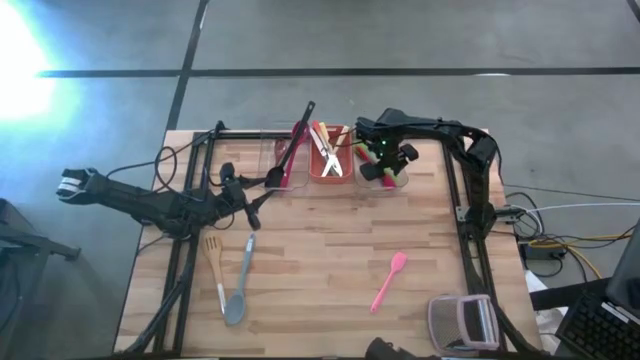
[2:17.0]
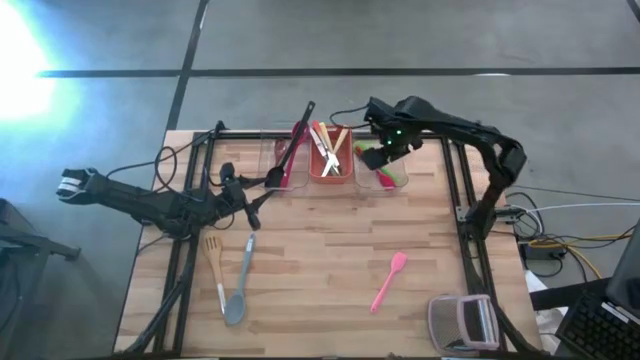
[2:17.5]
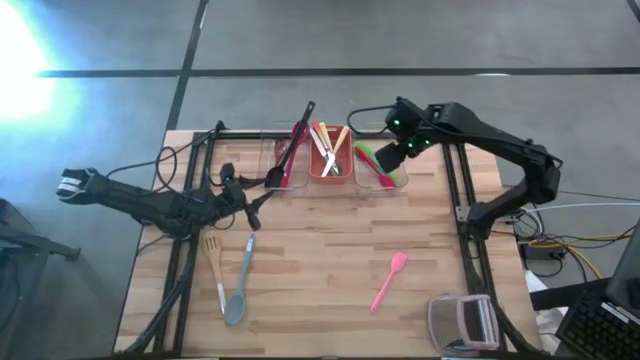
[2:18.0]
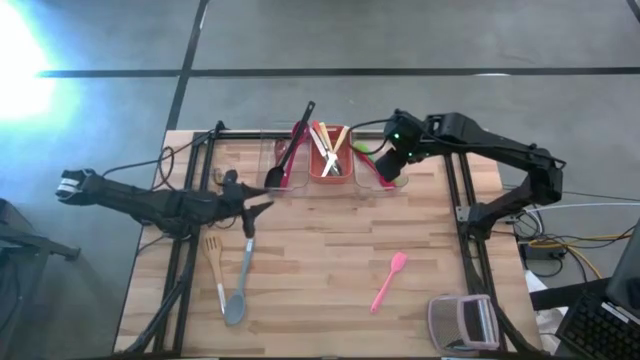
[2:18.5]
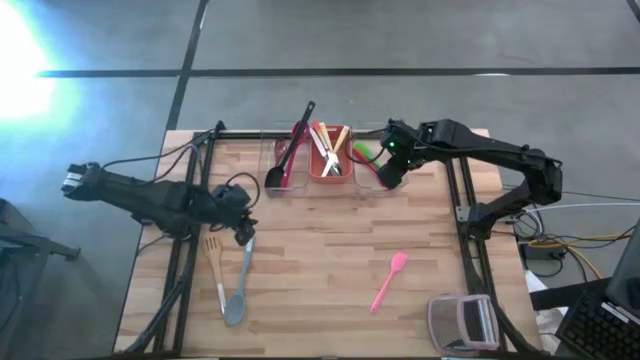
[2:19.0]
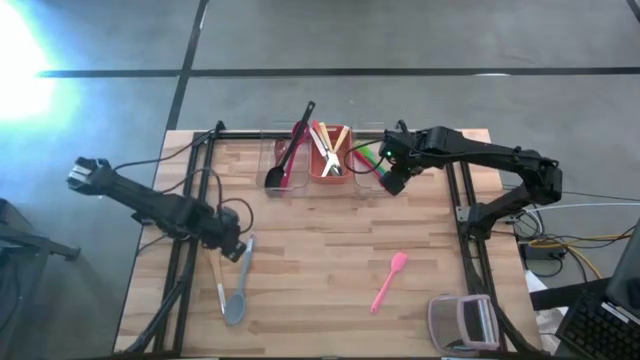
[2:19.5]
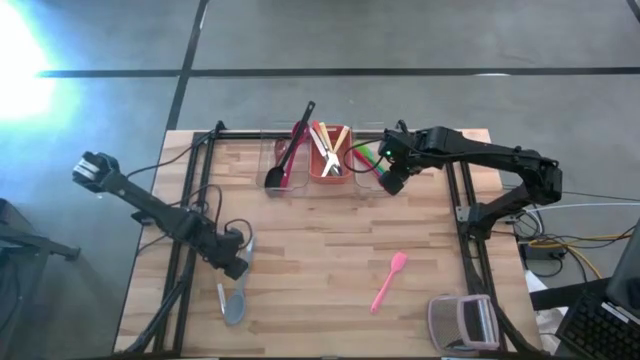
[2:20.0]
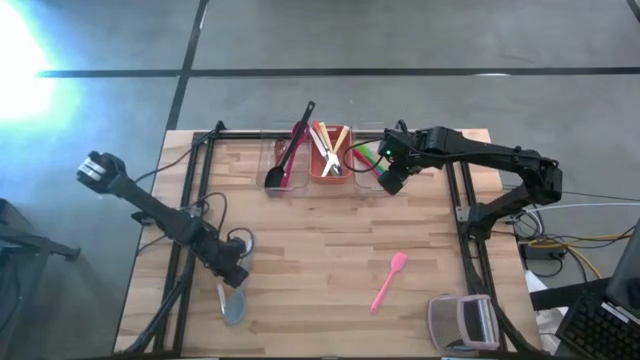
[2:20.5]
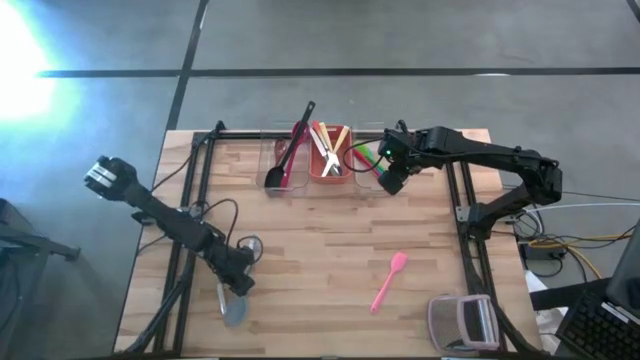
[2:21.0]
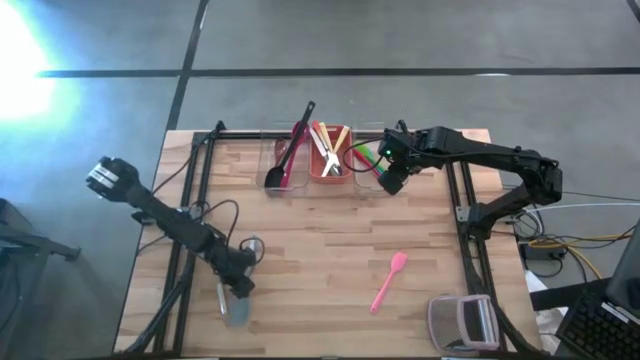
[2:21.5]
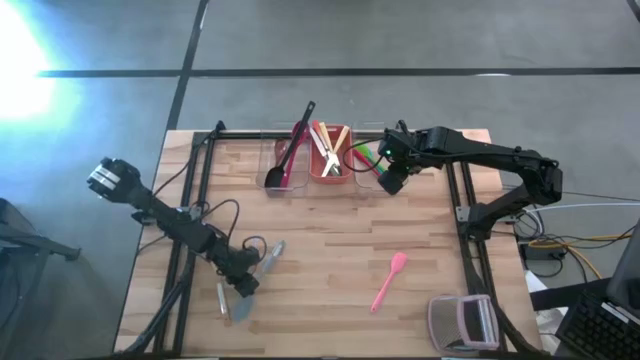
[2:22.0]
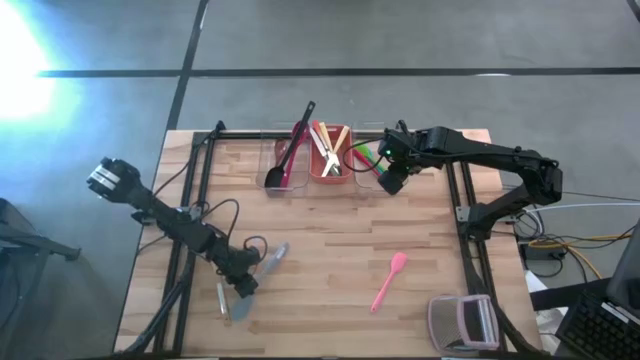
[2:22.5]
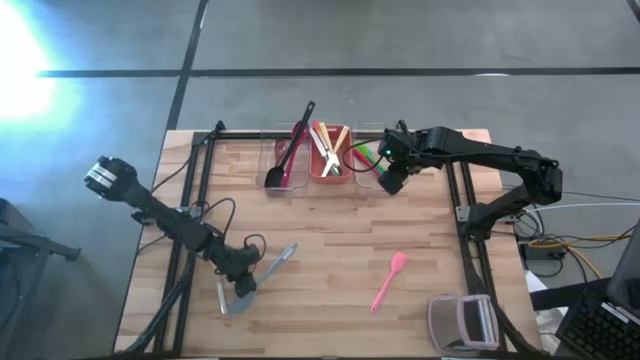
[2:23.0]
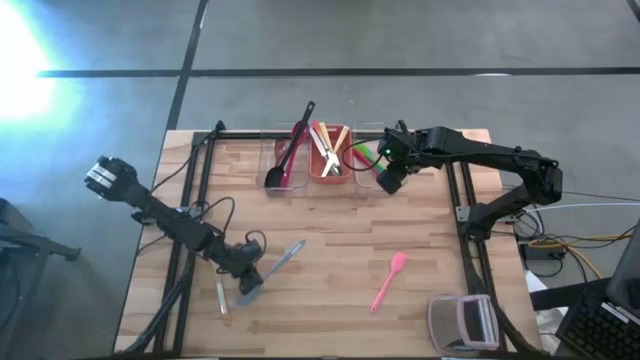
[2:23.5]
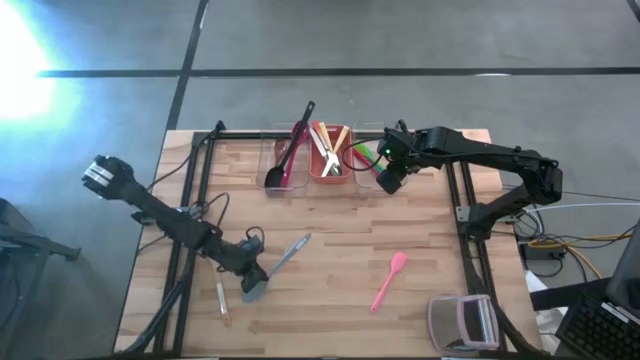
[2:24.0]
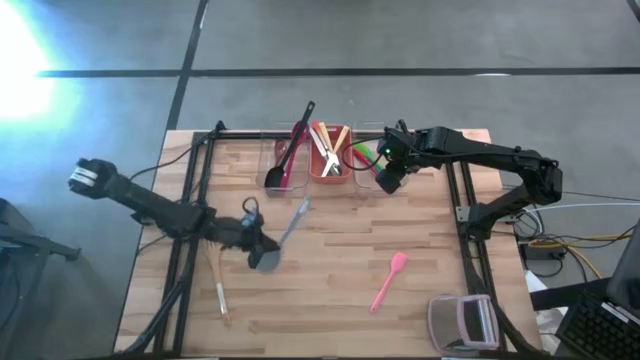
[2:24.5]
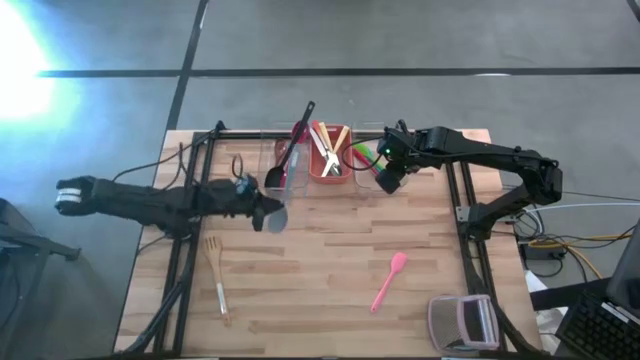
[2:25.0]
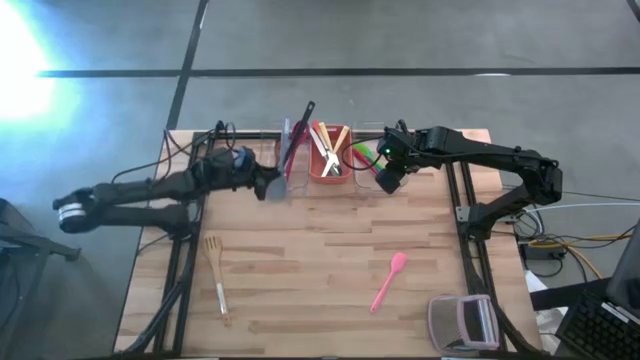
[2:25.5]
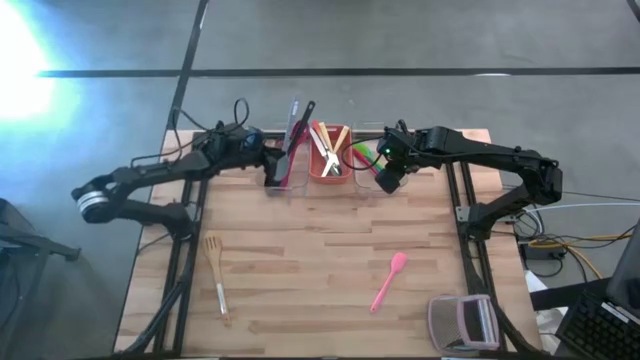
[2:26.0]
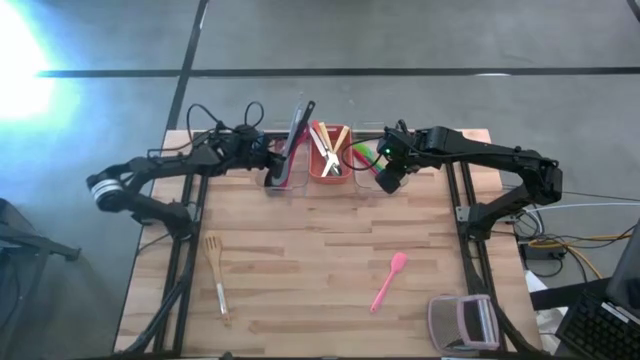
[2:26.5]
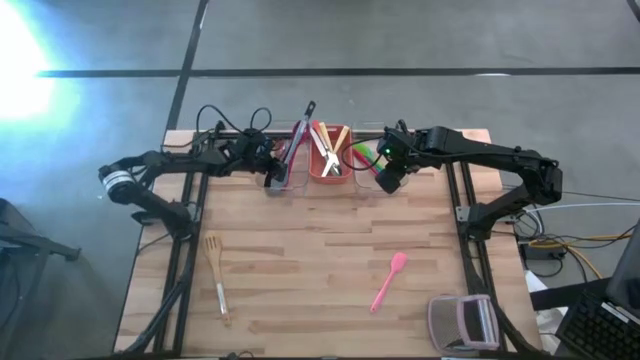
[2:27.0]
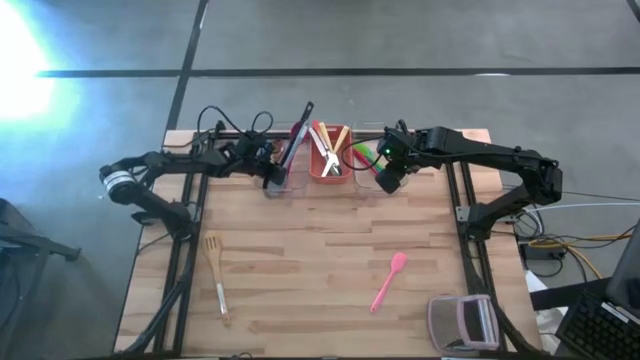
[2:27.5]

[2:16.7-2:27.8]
Task: Pick & Place Kitchen Items
Put the gray serving spoon into the left transparent bin

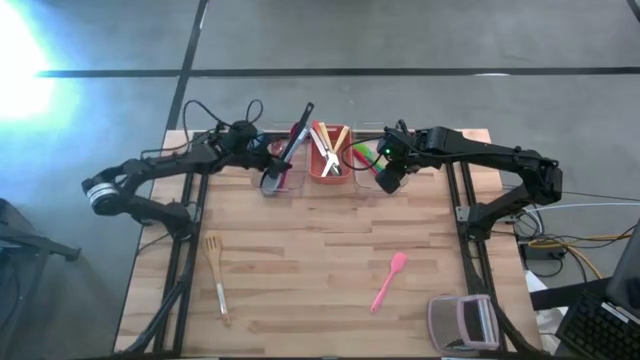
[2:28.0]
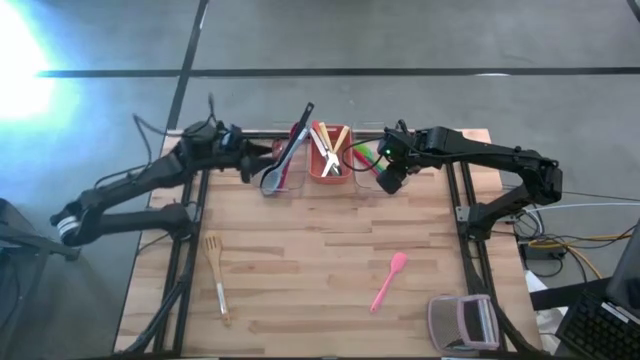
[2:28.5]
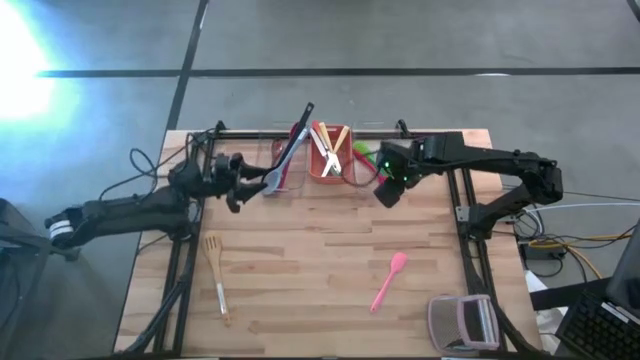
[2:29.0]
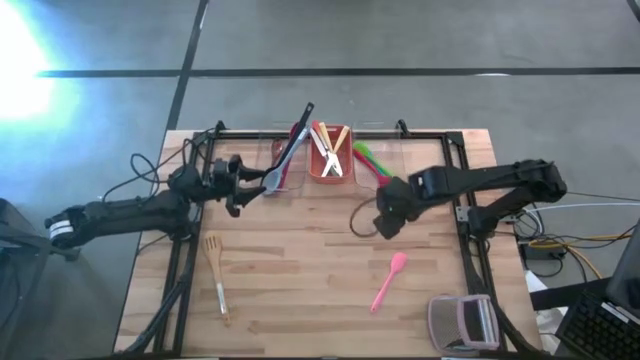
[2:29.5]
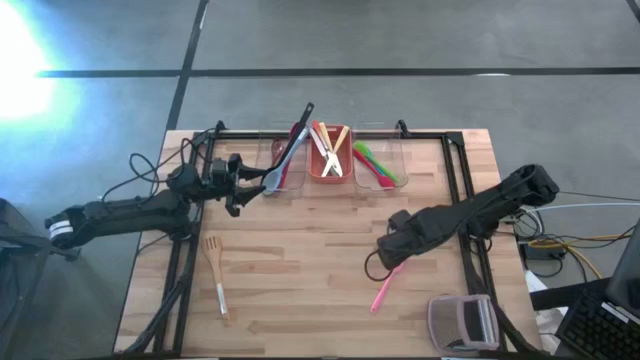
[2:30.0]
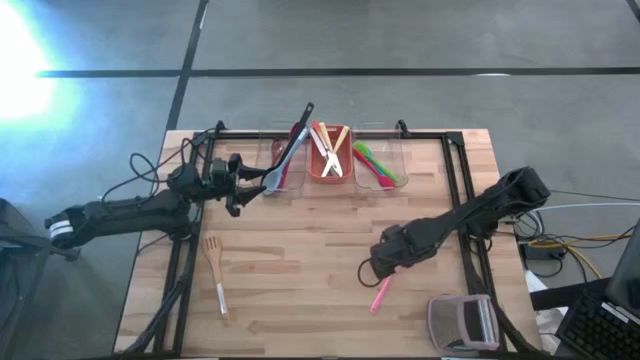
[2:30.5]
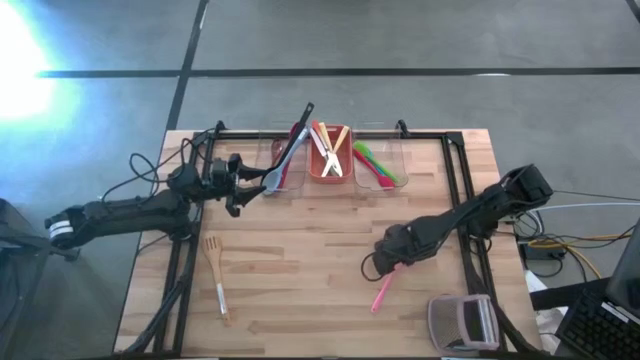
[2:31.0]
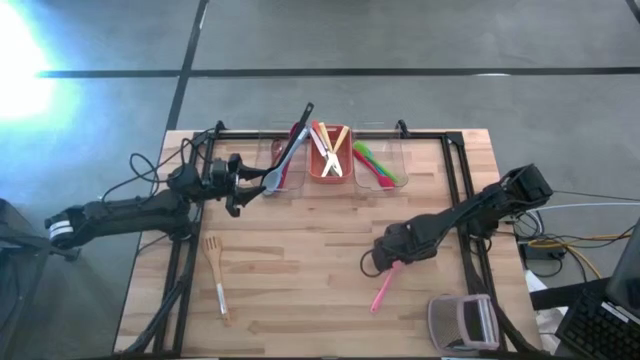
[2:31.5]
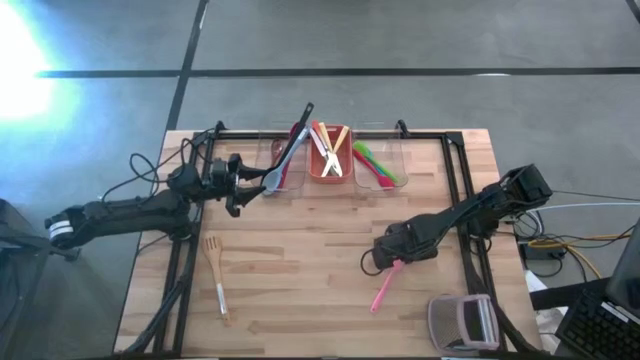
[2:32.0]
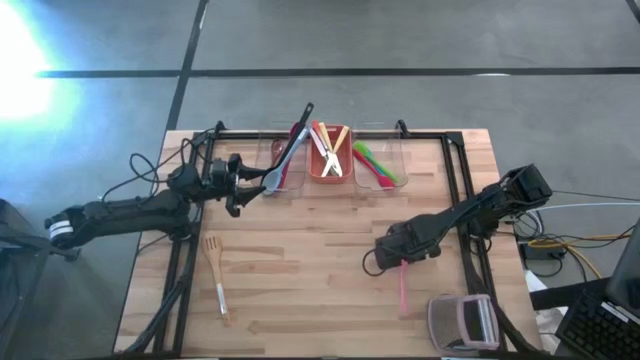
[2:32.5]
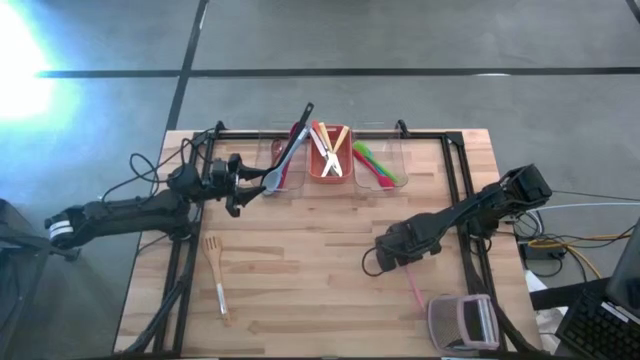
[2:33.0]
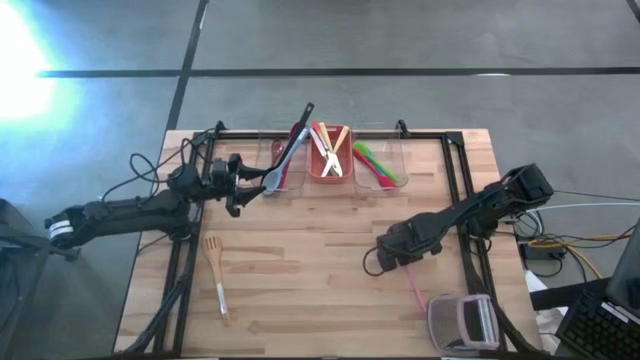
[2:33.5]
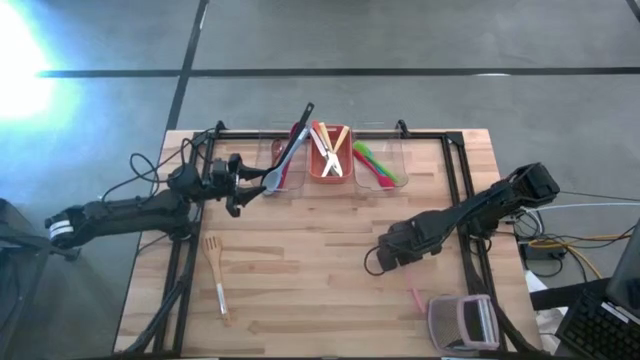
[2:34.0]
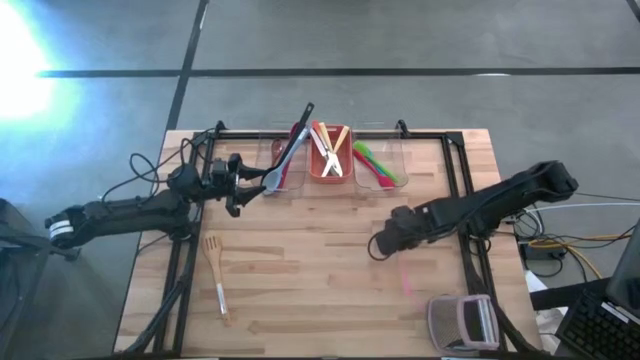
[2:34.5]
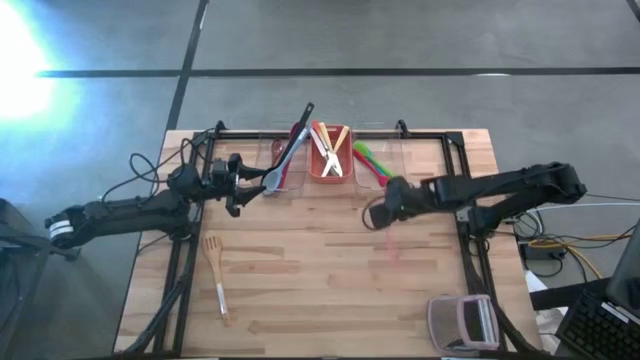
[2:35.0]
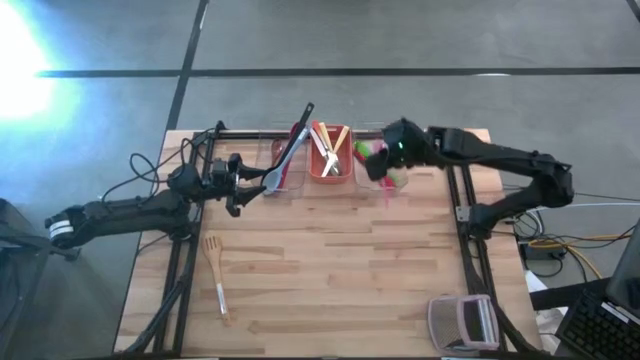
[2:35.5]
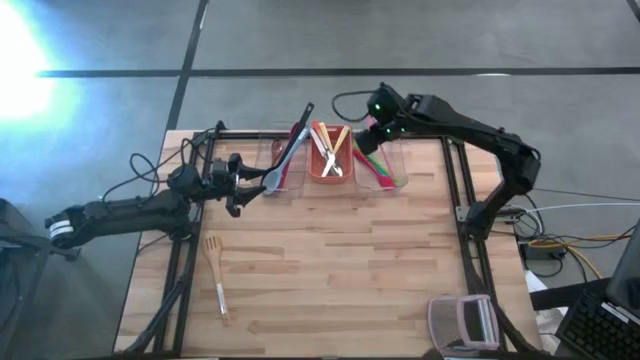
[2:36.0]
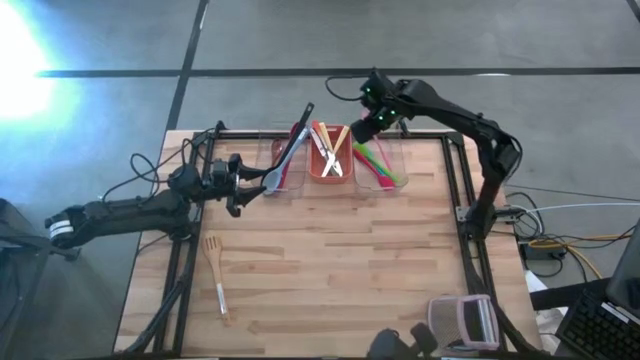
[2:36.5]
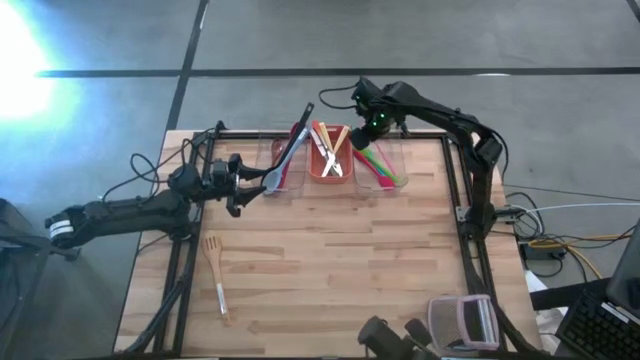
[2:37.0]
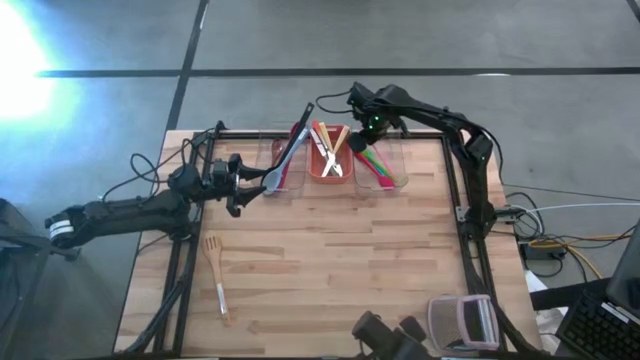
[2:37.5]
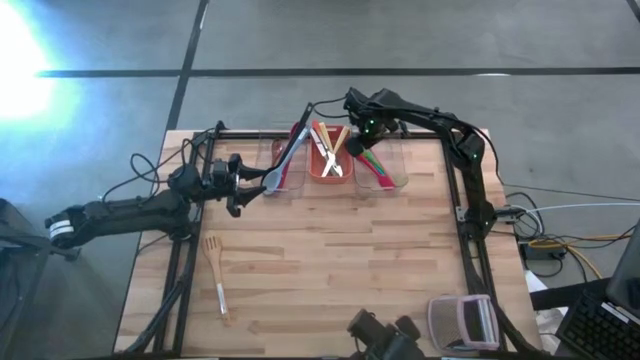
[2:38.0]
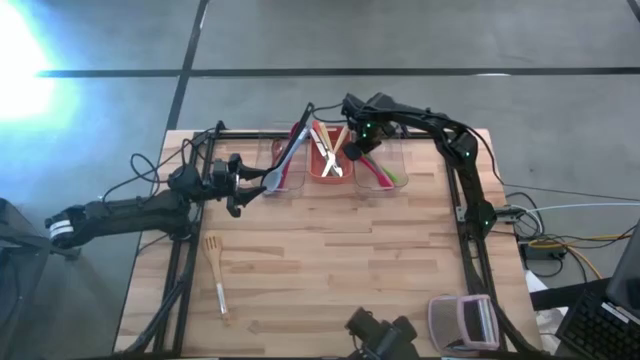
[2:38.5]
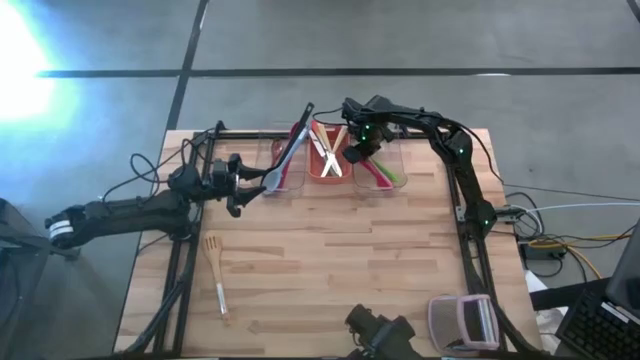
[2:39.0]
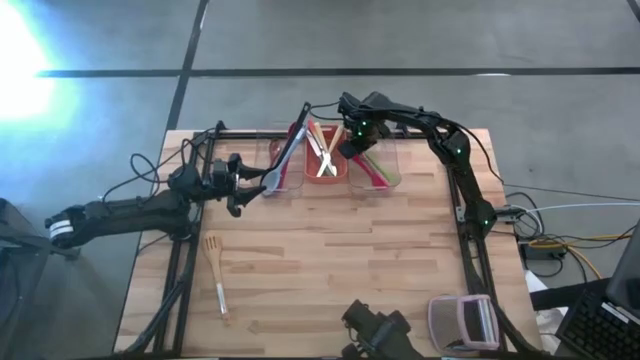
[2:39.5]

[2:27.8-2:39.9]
Put the pink spatula into the right transparent bin
